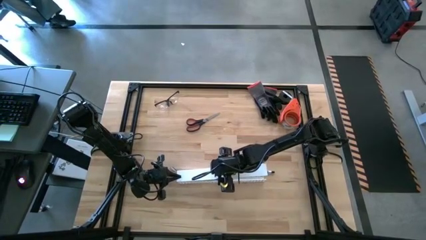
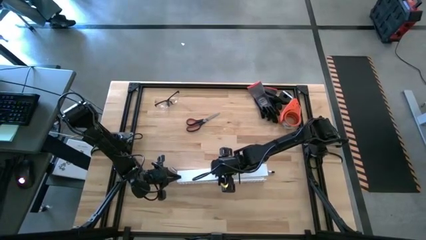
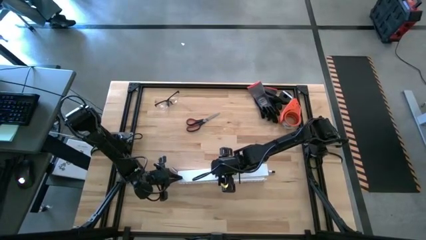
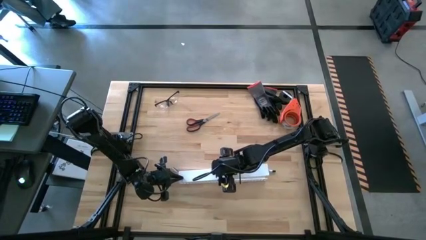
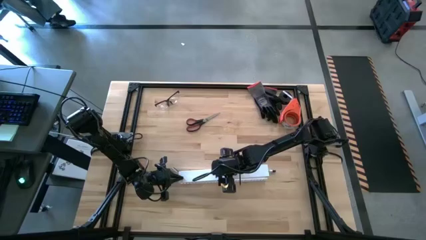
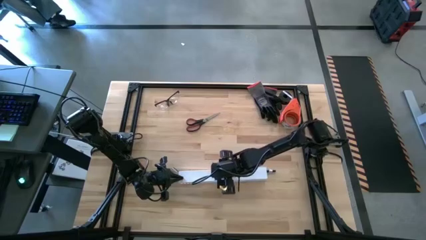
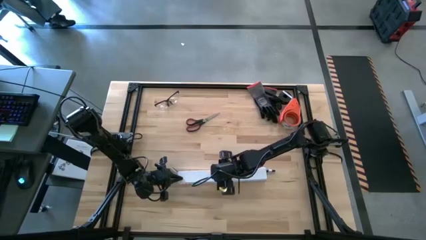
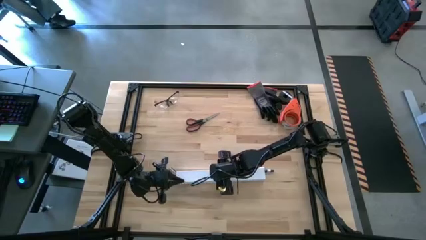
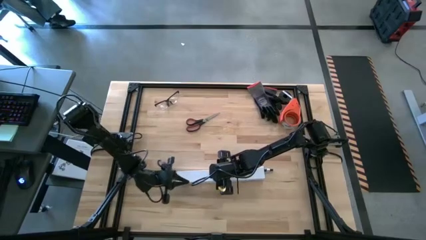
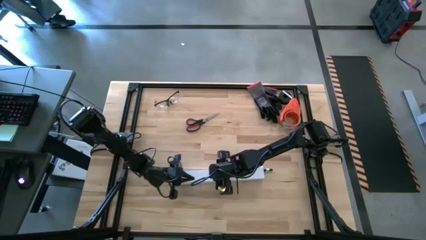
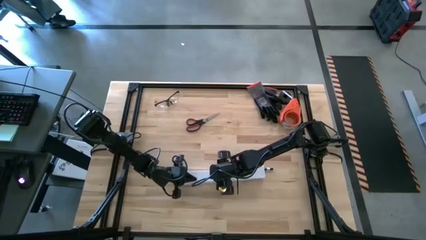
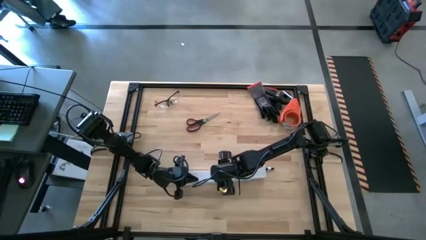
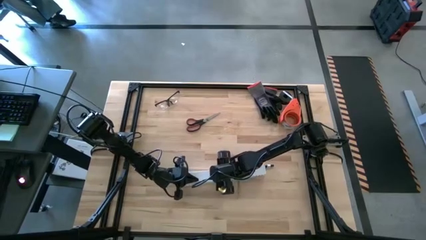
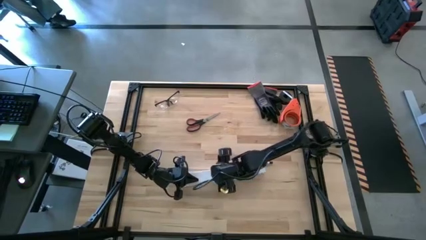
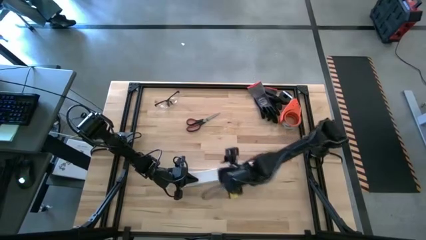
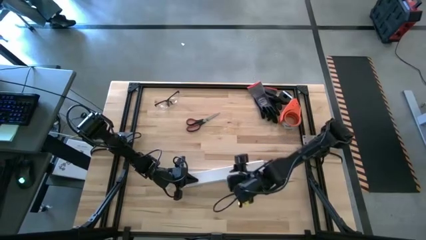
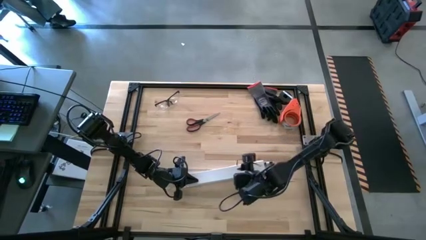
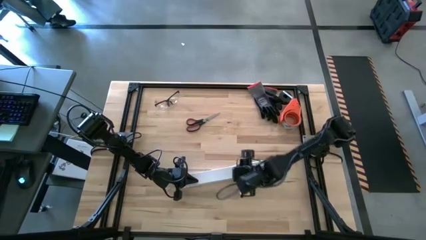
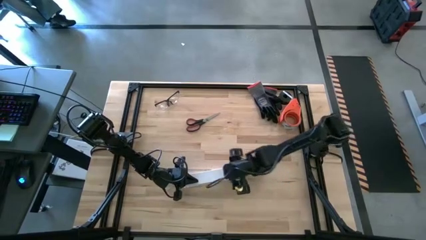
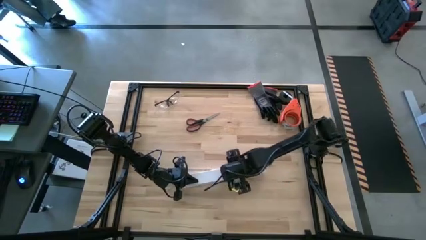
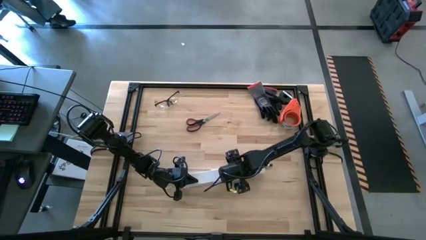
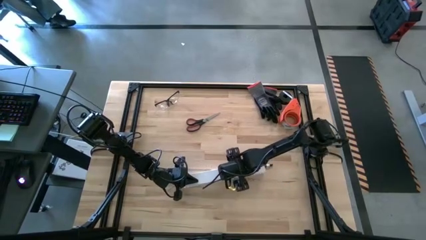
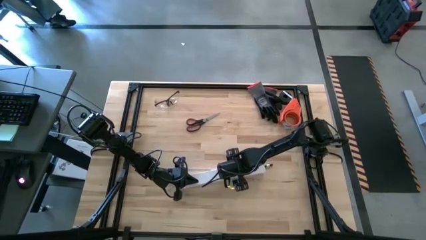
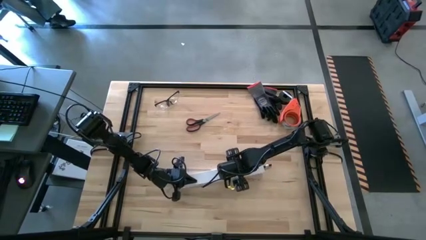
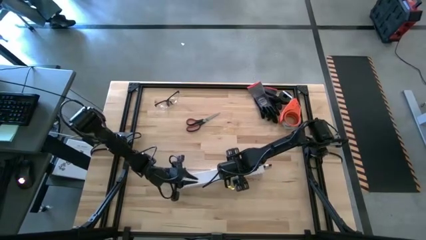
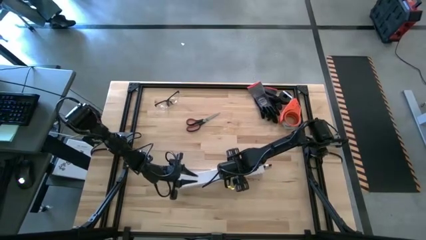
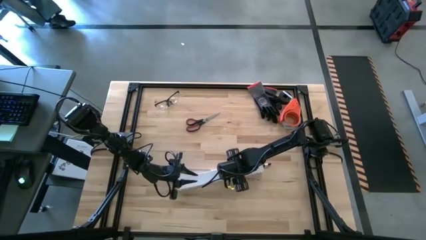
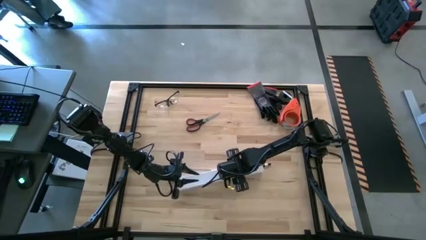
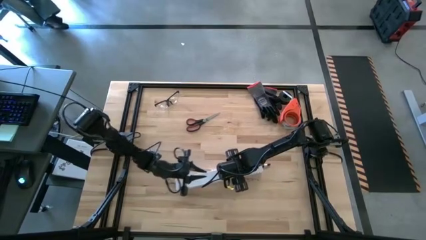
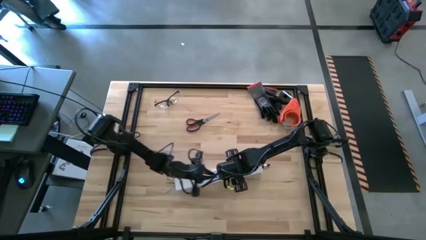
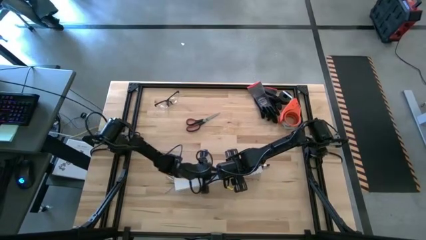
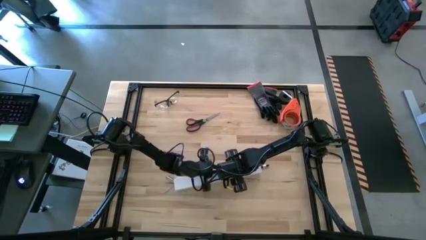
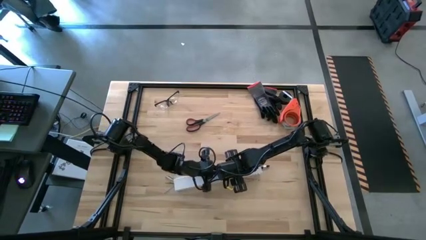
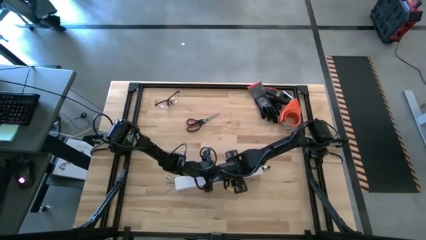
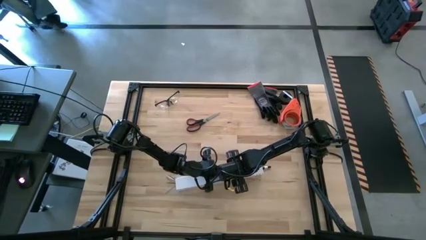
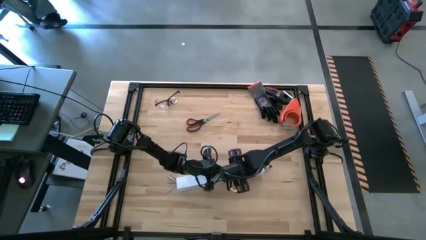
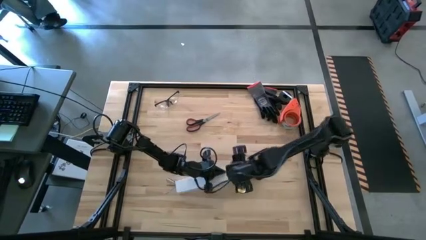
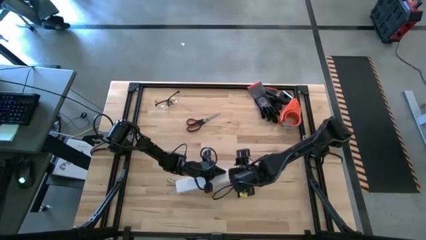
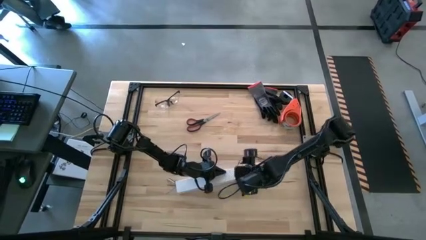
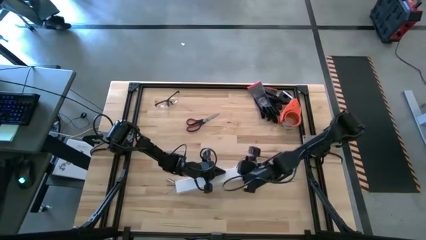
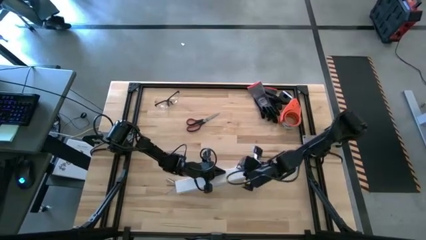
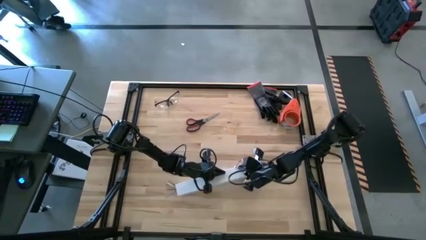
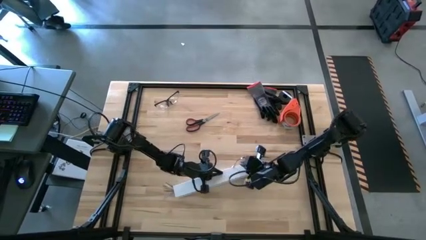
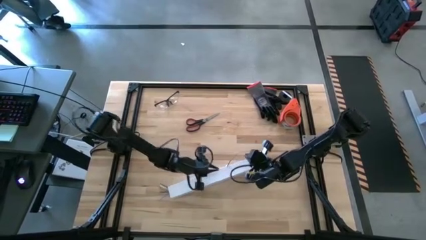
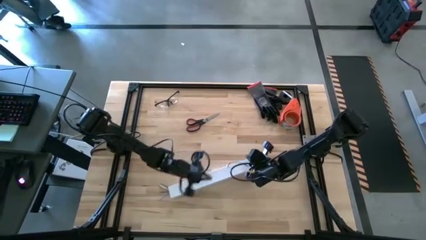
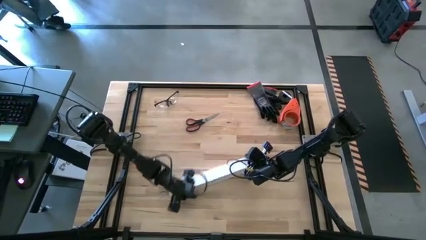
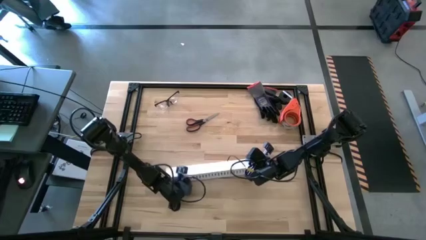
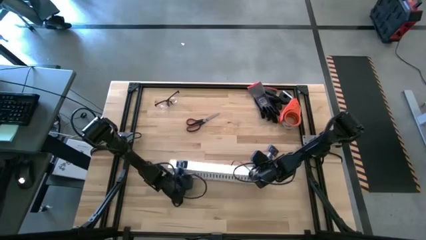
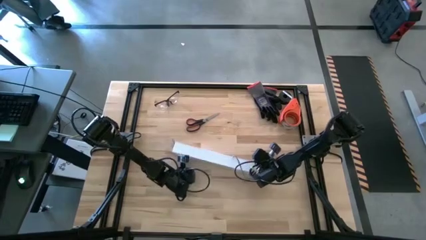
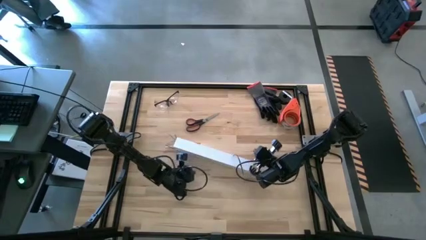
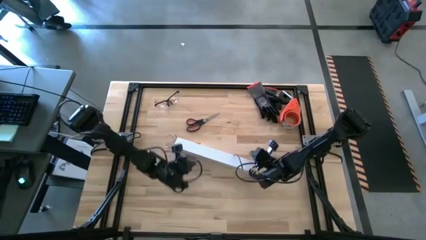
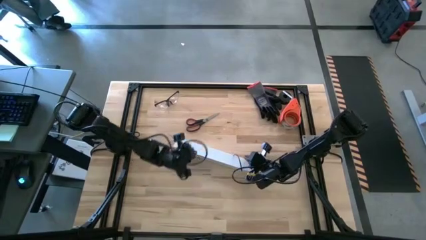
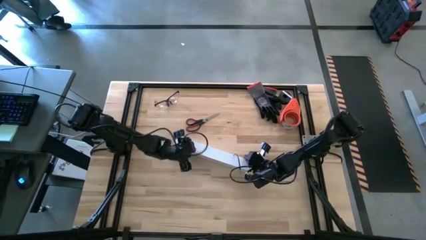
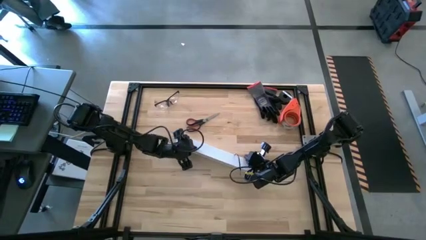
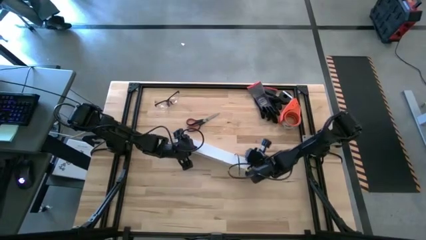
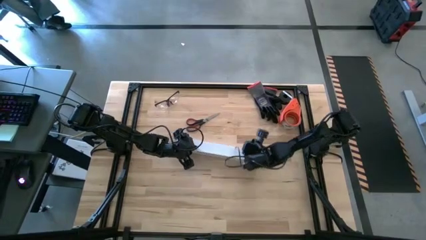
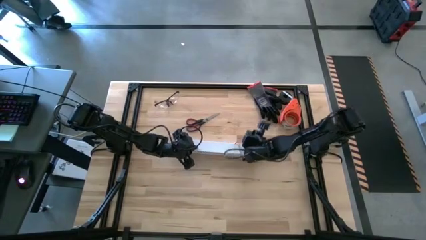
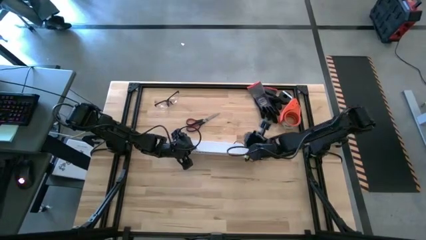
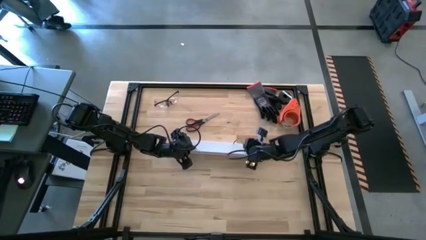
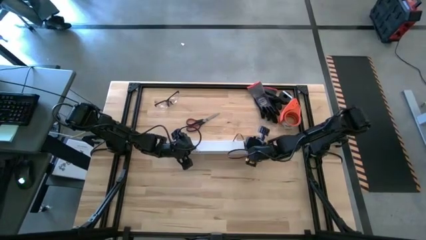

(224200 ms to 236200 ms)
Task: Ziptie cables
Close the white cable duct lid

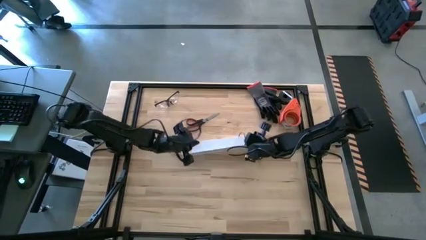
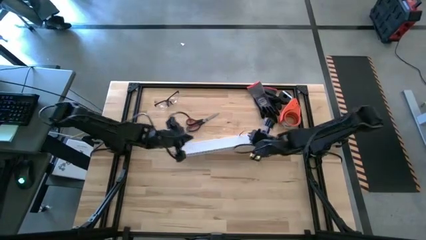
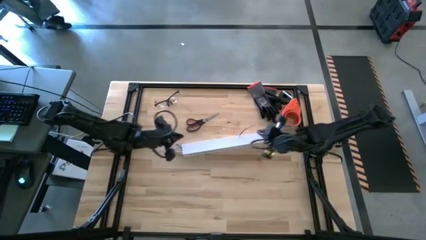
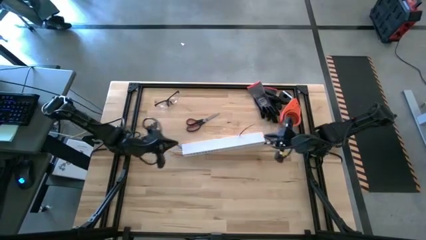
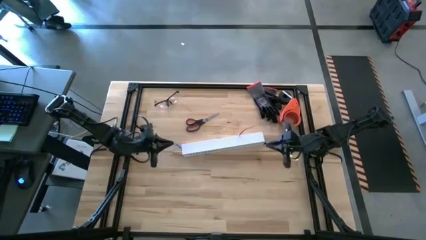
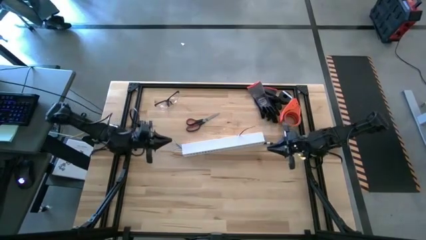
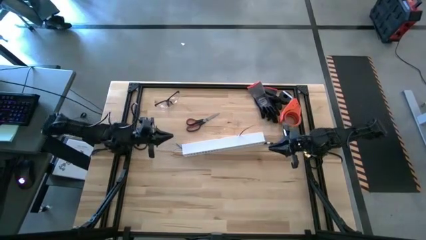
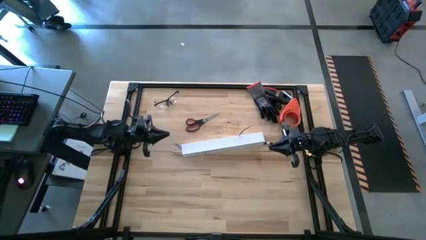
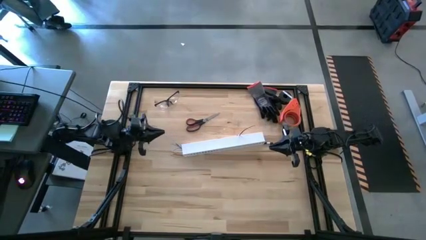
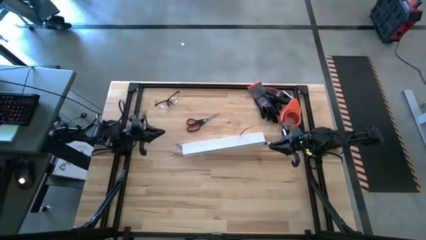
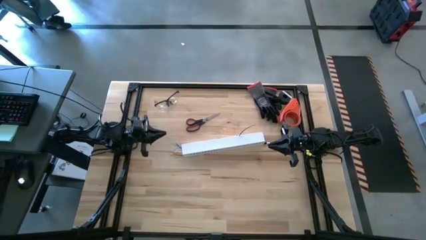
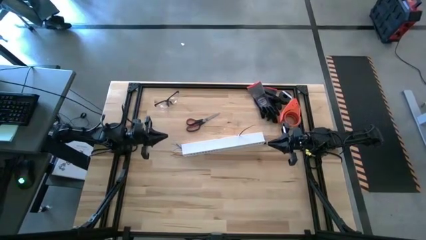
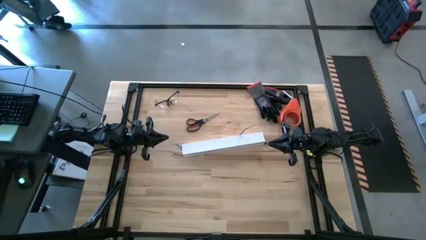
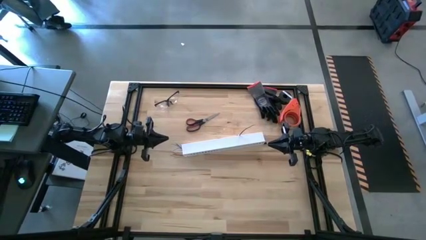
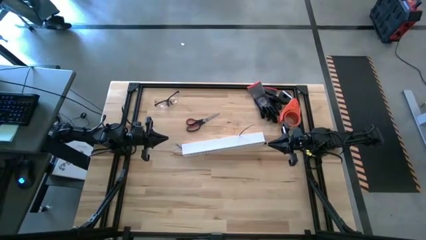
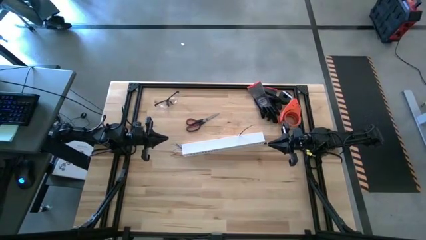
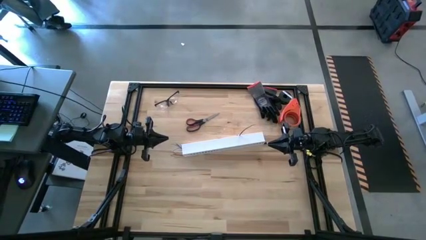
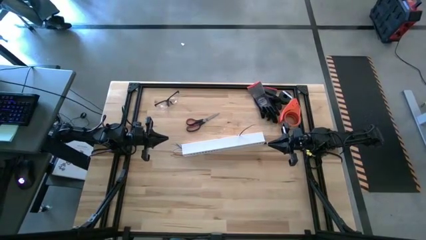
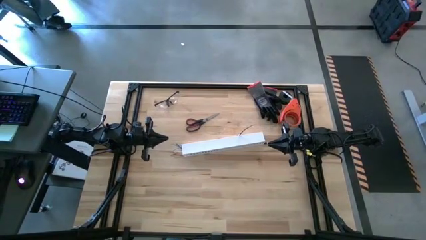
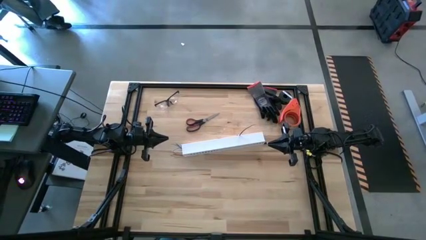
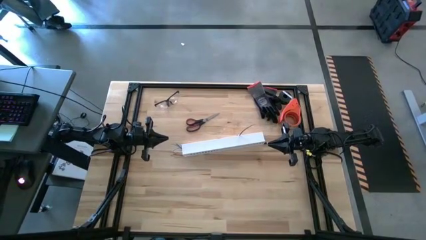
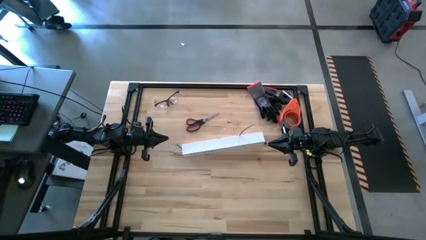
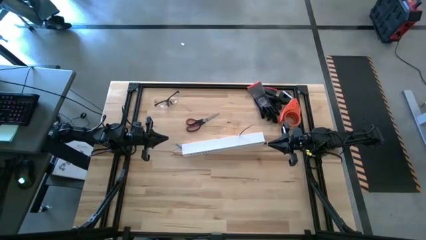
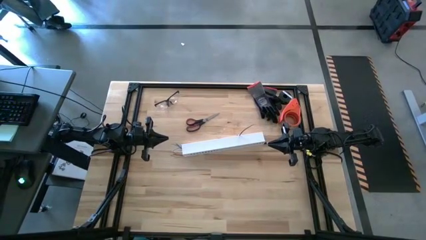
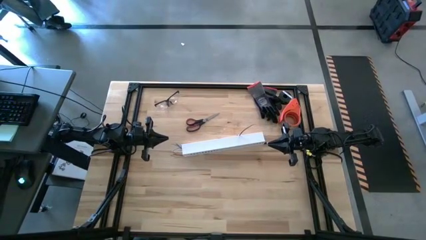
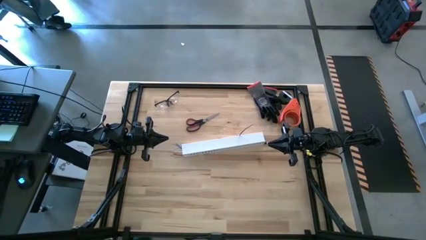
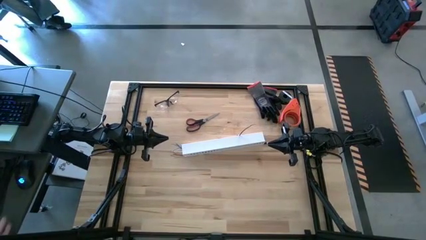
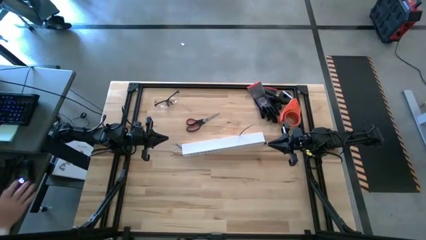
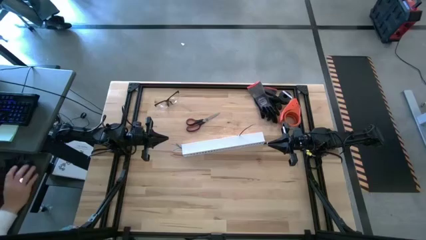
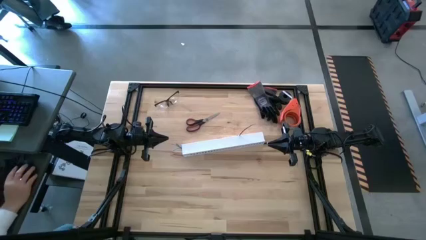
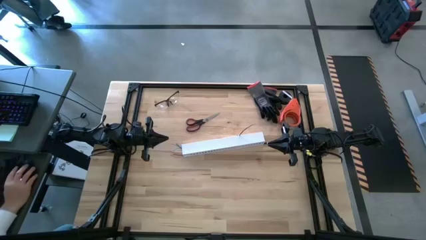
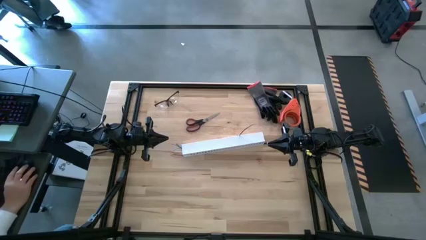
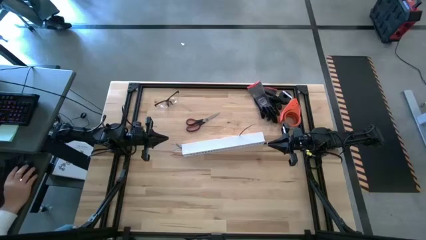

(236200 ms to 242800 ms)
Return to Home Position
